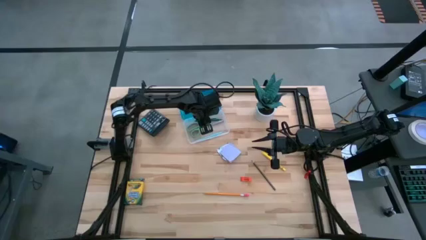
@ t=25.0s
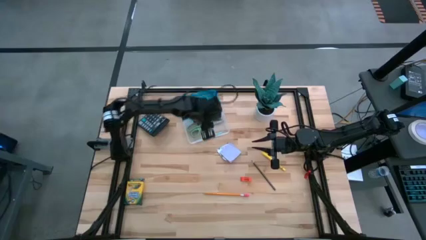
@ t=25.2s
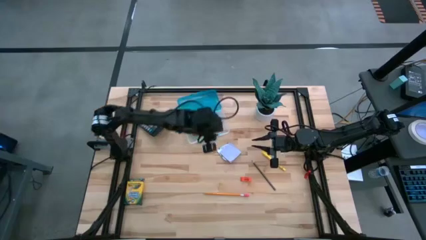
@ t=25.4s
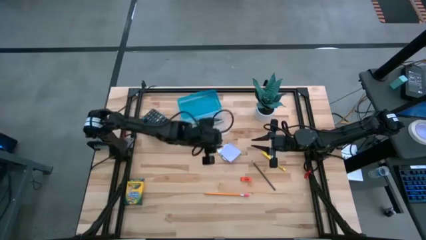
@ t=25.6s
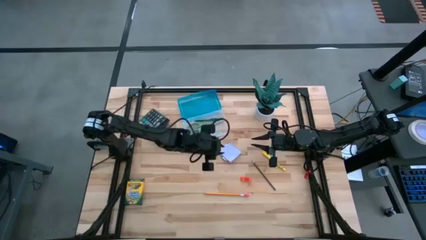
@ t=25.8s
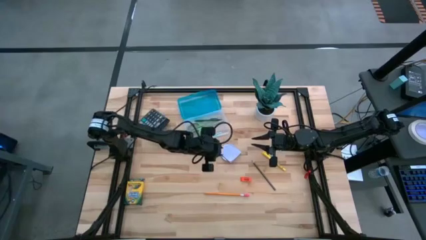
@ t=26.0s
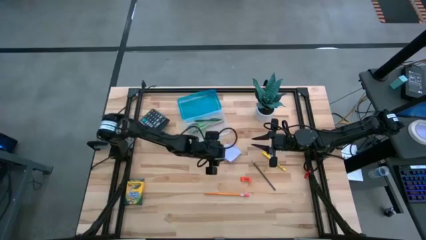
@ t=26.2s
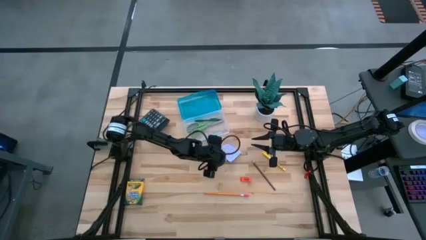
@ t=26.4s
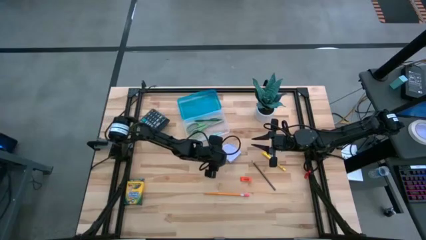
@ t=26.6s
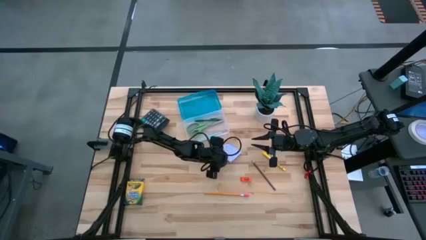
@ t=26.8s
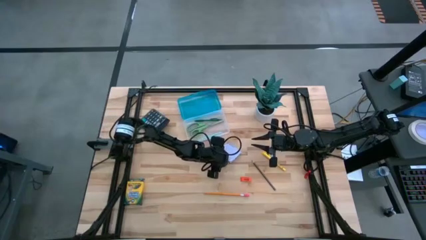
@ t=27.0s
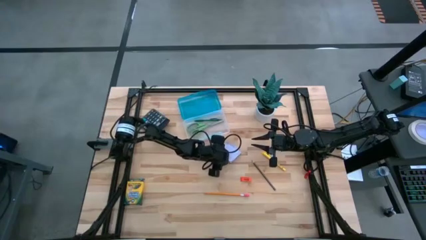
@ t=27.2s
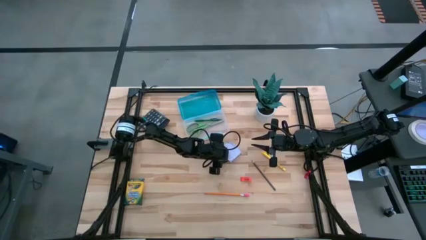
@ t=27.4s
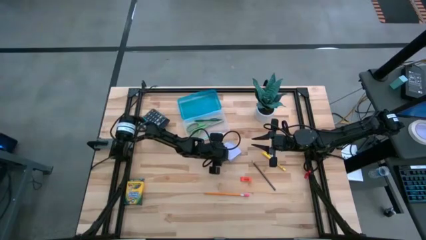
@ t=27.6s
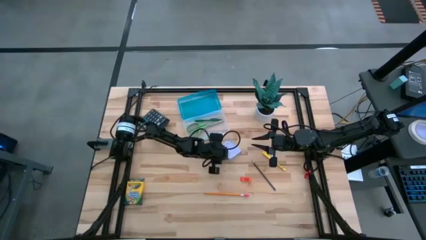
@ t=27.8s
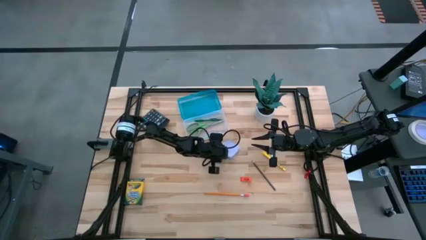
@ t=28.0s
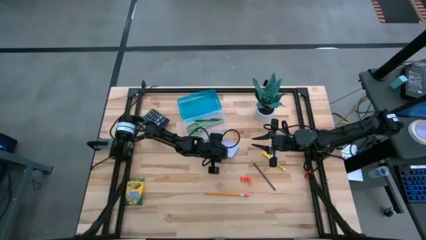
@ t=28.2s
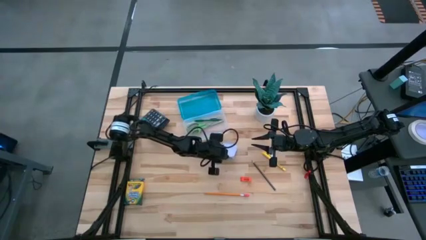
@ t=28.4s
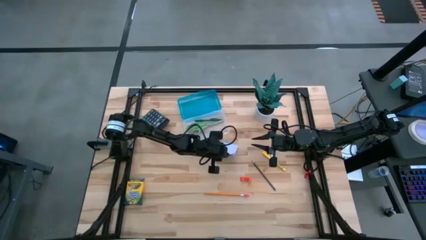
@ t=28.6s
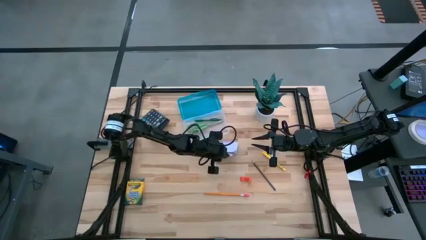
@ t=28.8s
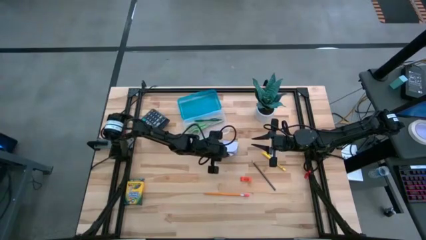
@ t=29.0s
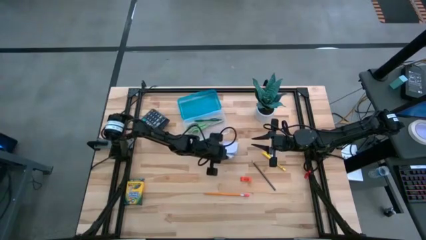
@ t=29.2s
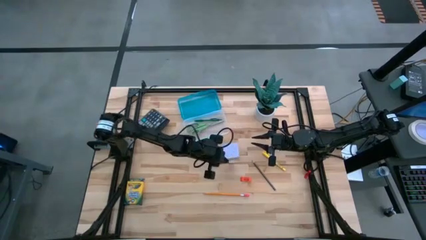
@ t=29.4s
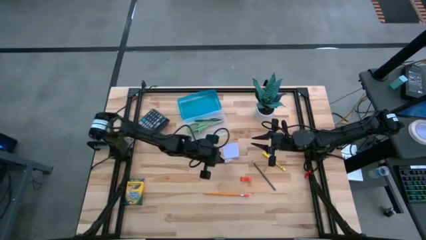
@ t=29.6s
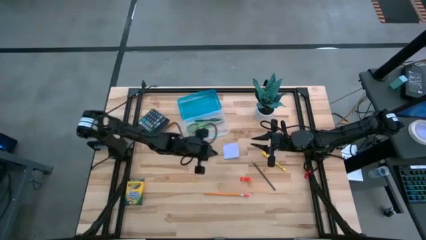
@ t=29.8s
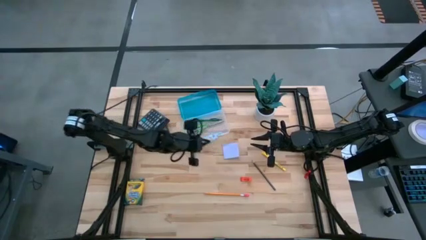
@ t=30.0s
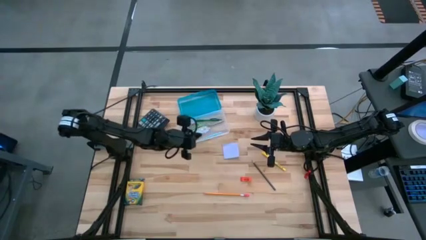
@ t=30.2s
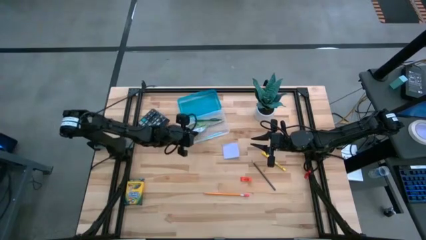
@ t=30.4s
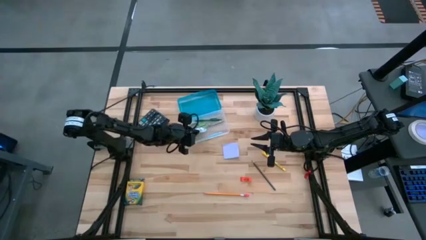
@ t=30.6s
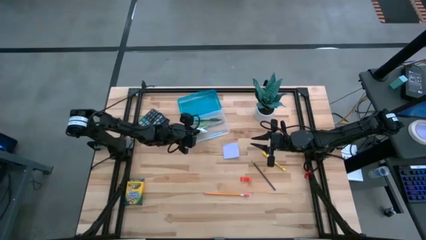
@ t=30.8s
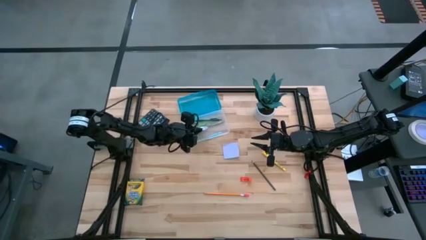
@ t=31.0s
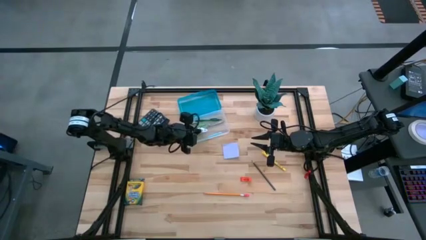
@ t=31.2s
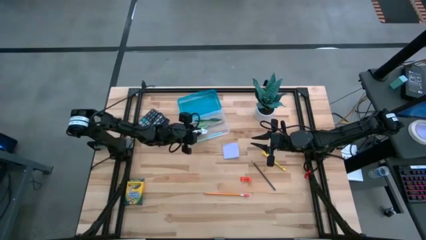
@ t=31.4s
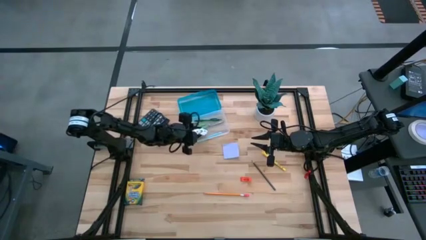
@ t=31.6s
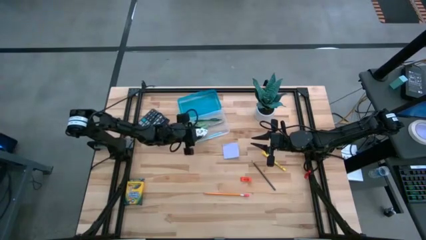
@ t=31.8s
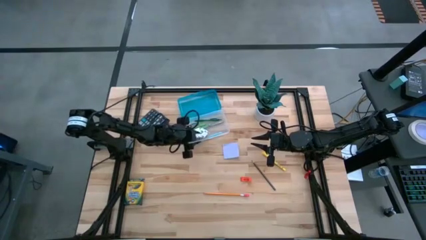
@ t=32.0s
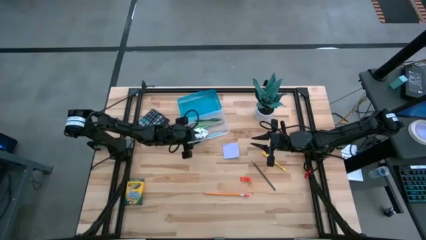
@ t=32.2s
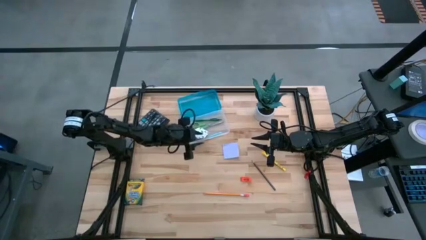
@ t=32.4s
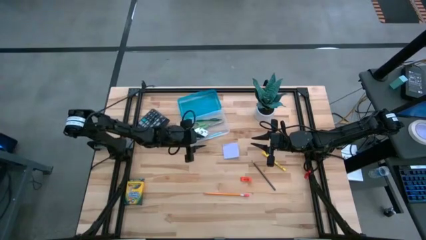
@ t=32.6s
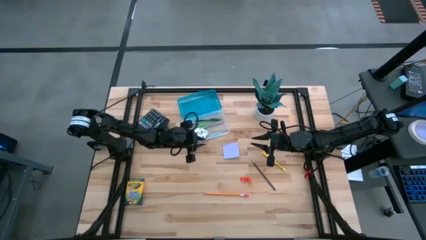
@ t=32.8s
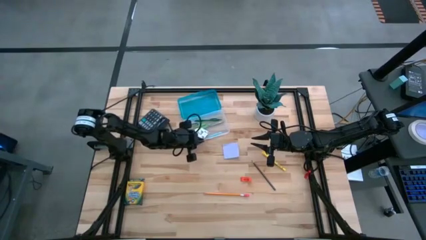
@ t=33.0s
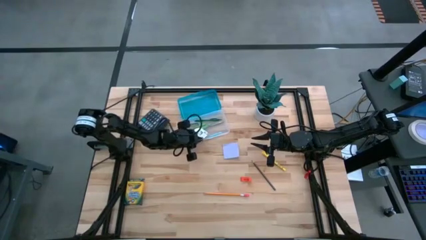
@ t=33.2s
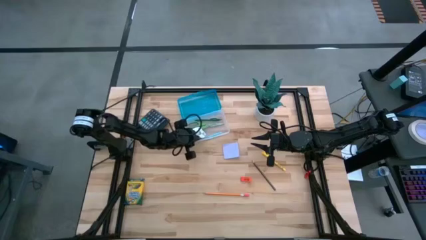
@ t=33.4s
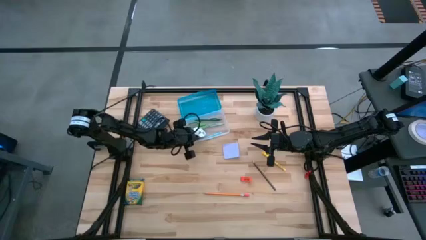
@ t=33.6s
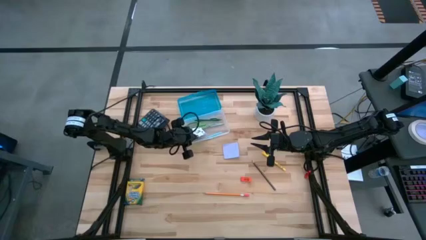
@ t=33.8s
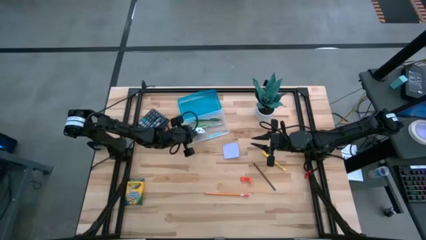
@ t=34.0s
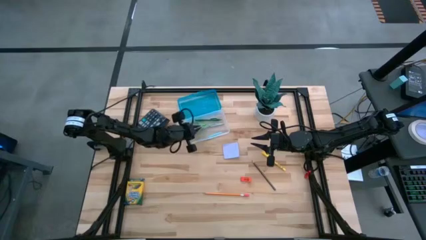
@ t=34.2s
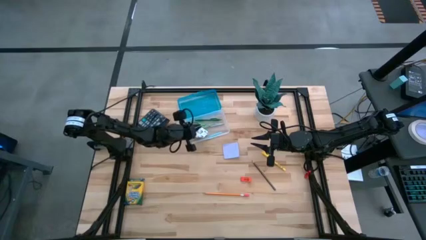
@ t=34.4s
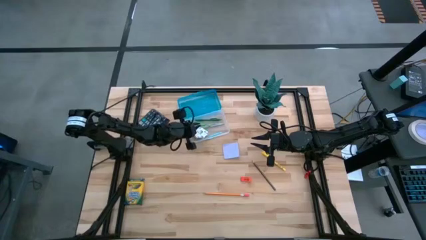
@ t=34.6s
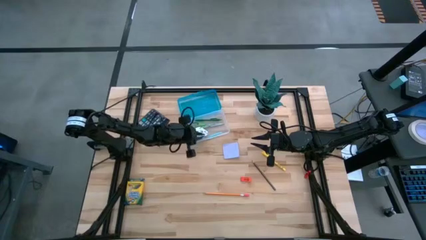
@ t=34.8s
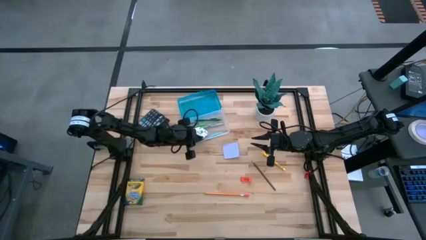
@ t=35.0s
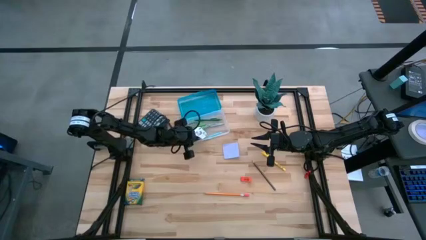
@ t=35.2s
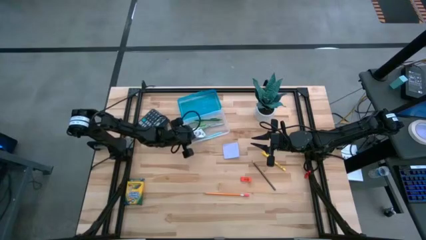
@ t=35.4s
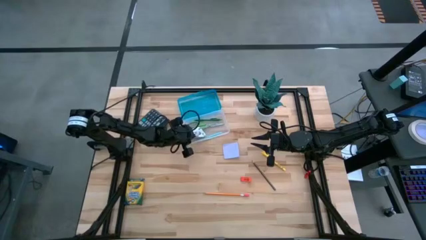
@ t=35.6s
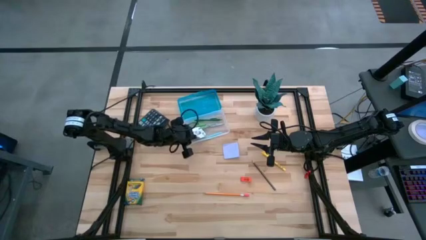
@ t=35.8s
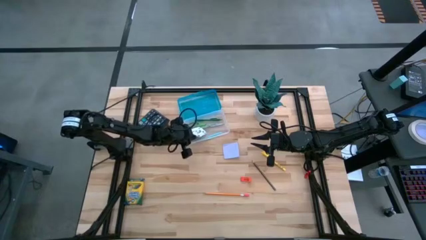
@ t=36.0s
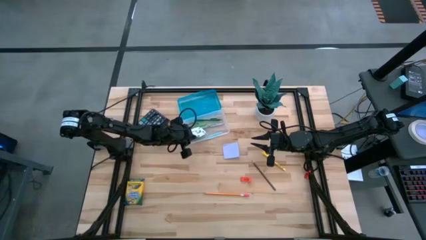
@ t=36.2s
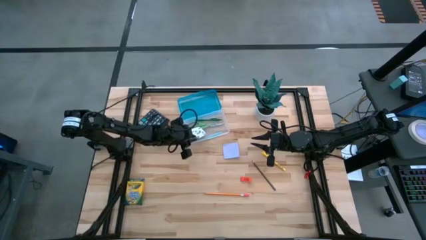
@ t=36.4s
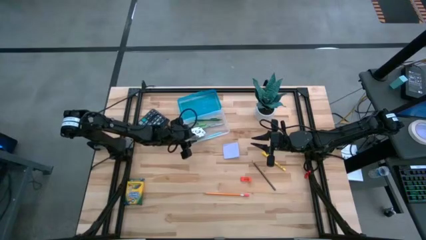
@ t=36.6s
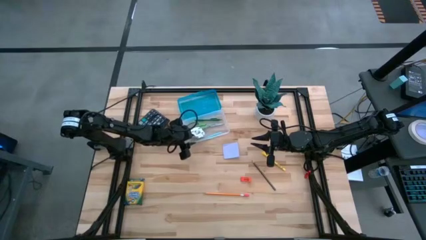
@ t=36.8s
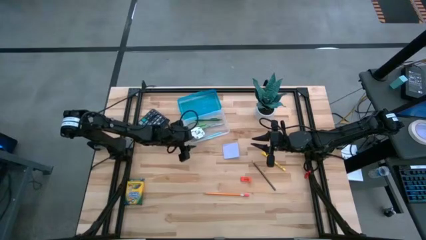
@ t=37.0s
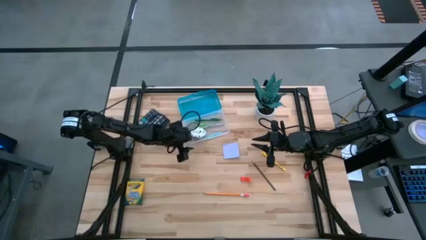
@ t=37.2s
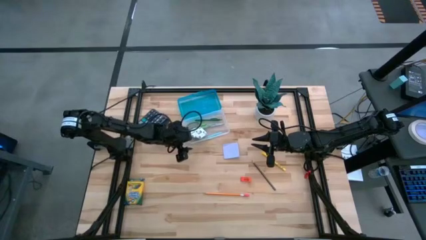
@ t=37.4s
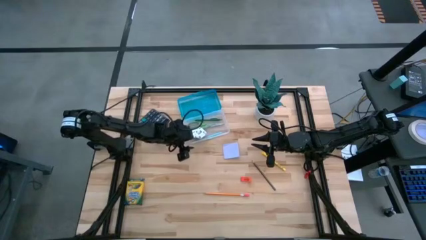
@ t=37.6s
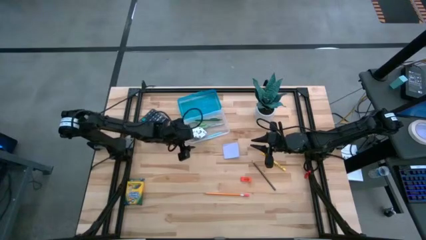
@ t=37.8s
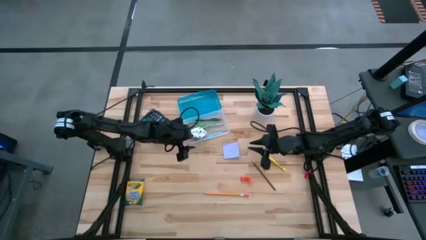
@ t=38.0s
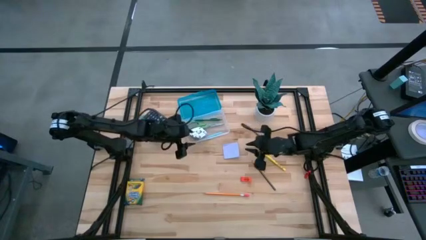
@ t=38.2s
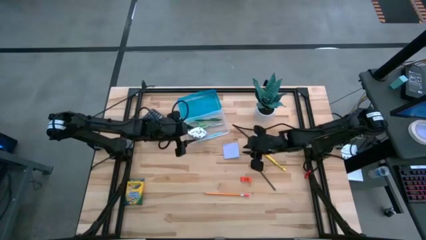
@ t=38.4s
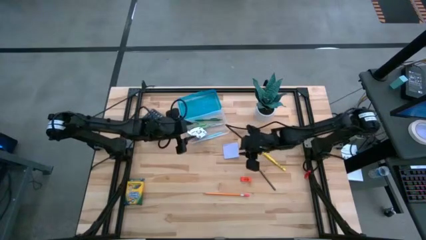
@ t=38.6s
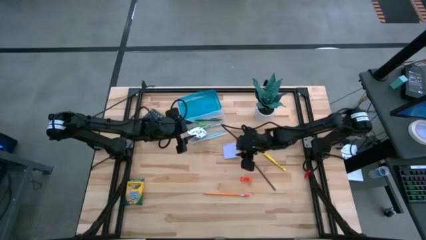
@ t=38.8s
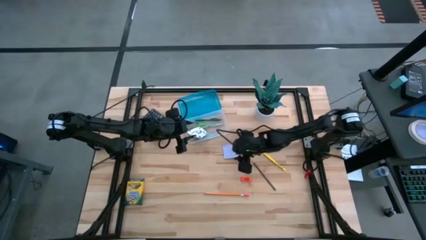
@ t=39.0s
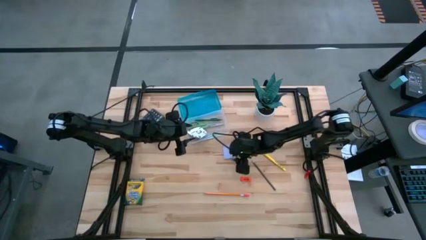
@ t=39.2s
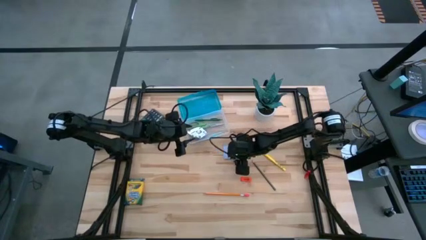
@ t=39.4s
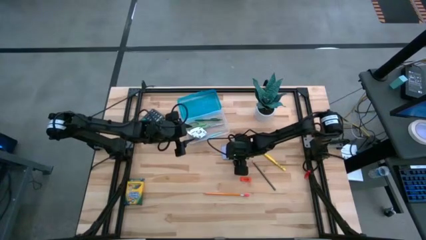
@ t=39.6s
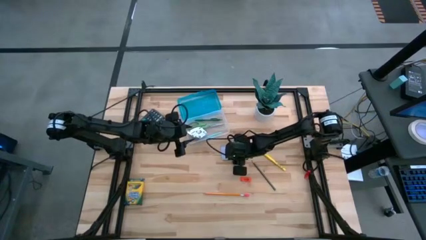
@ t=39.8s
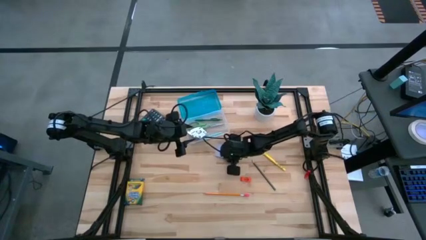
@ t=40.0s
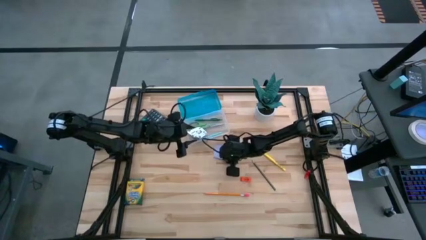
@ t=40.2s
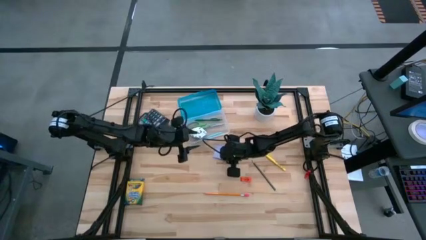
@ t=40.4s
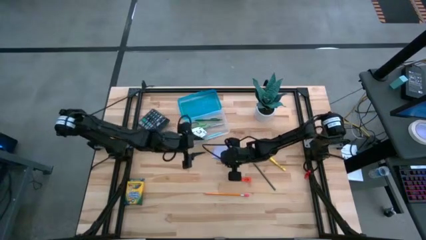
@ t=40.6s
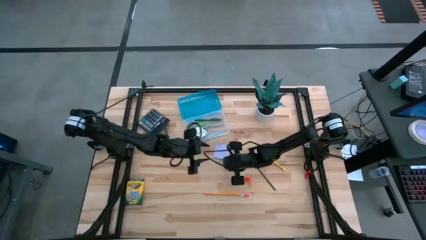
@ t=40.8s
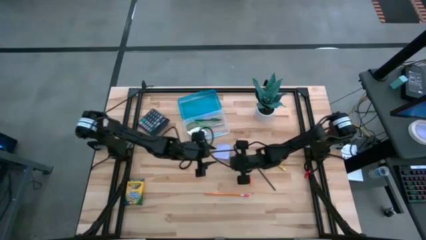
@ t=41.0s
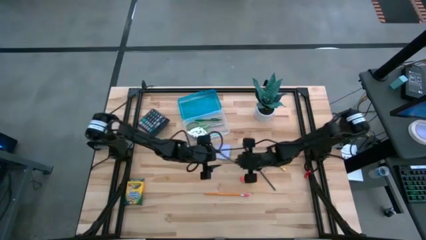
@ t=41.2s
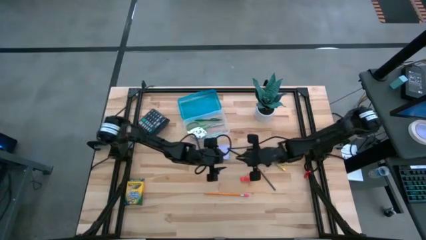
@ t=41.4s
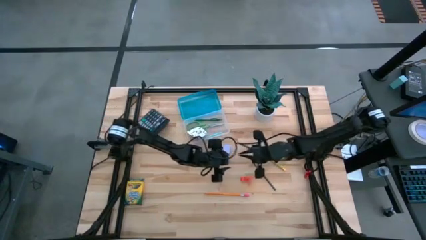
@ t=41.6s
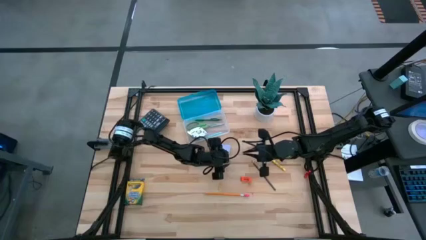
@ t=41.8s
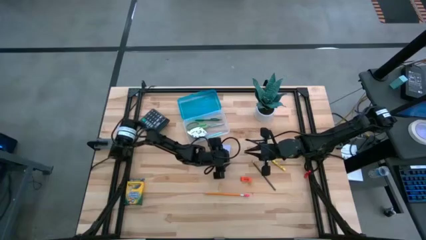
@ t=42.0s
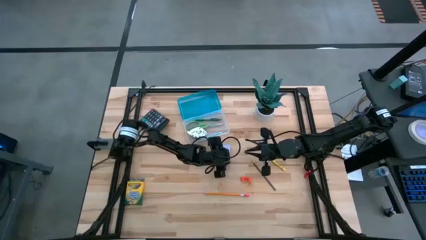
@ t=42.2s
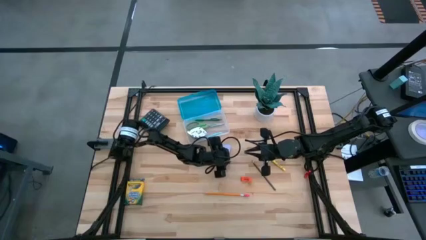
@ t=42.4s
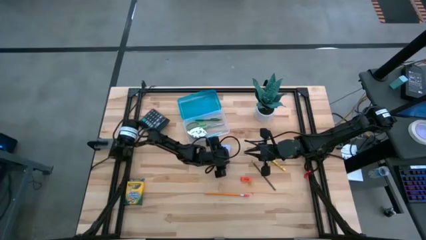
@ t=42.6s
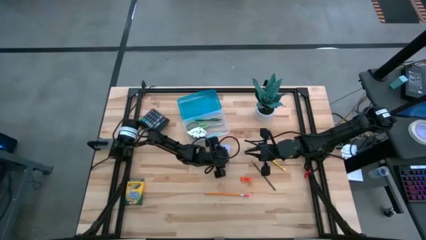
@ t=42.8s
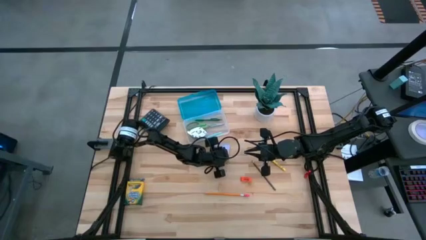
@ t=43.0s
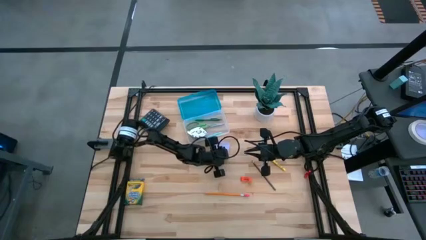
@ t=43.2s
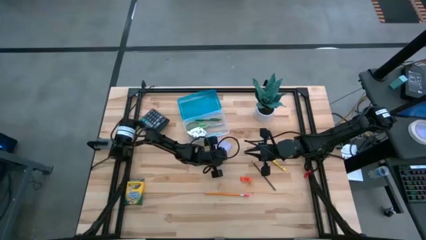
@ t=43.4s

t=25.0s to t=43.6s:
Task: Pack school essentials
Put the purple sticky notes into the blue supply box
